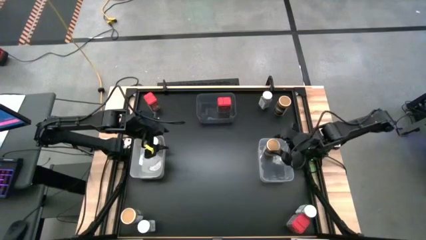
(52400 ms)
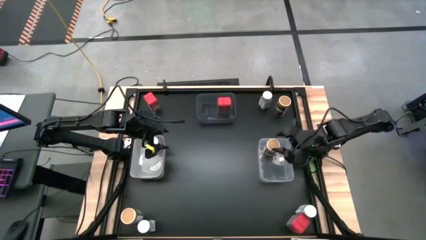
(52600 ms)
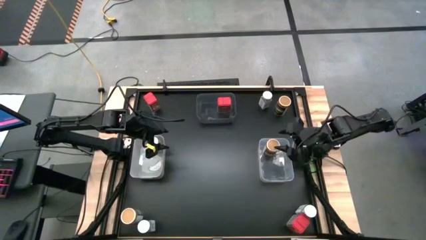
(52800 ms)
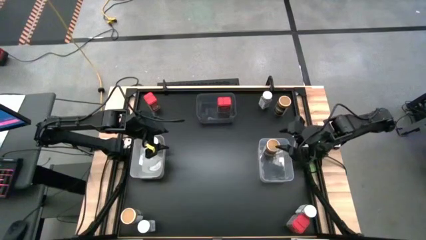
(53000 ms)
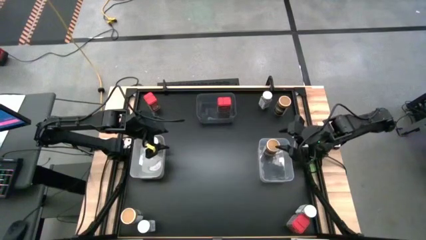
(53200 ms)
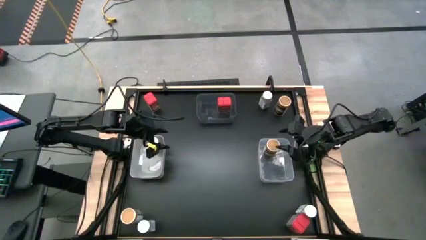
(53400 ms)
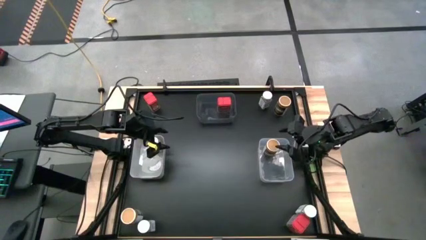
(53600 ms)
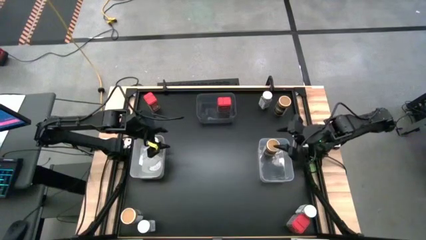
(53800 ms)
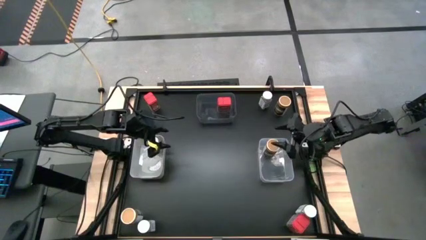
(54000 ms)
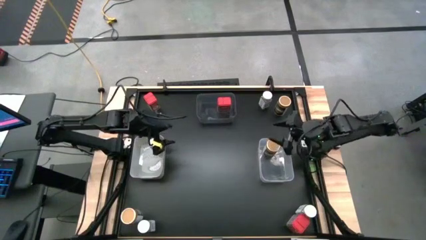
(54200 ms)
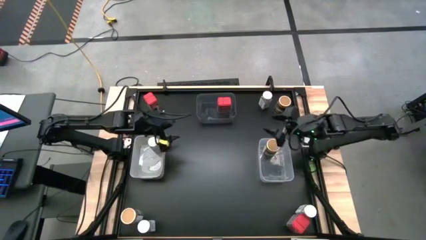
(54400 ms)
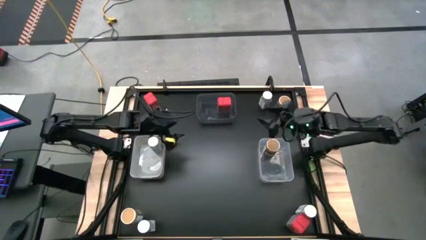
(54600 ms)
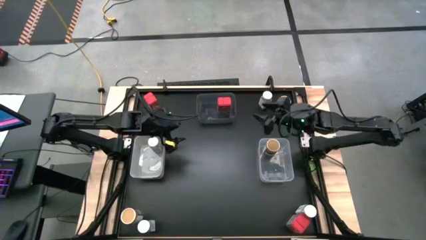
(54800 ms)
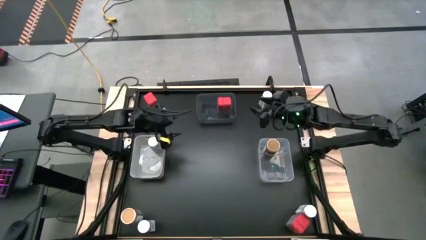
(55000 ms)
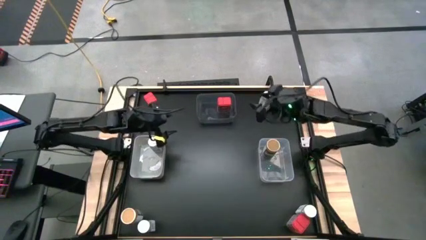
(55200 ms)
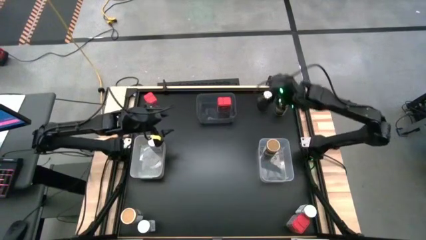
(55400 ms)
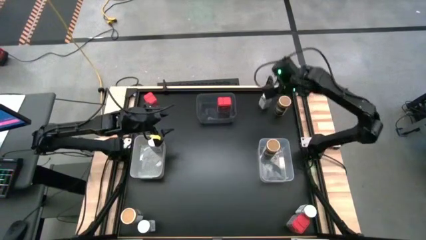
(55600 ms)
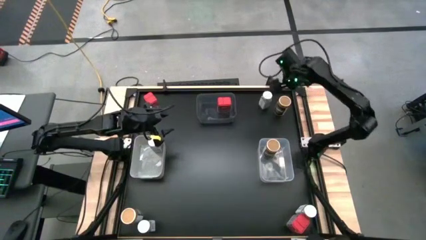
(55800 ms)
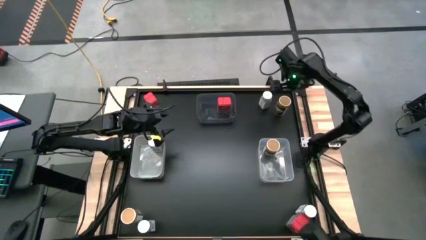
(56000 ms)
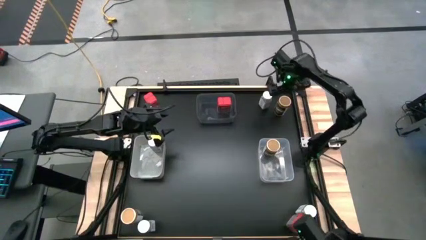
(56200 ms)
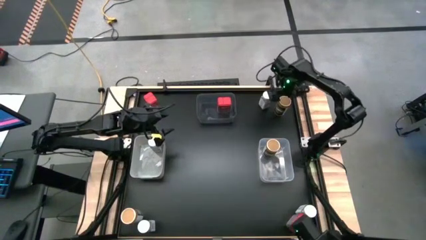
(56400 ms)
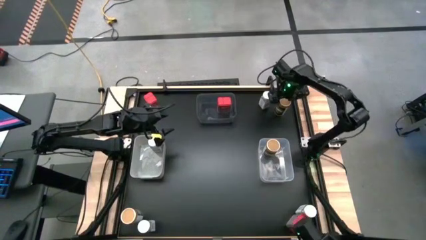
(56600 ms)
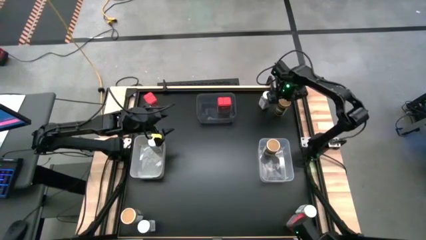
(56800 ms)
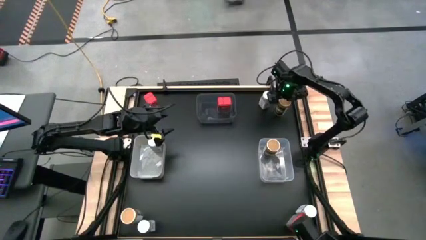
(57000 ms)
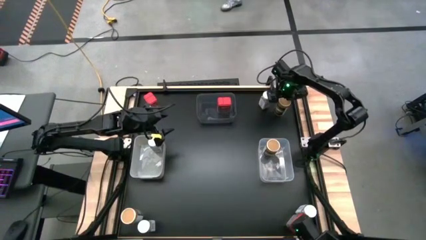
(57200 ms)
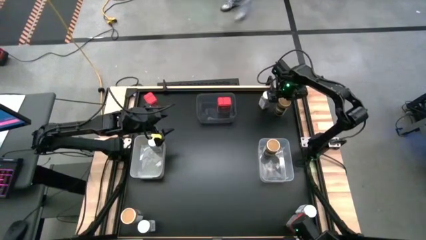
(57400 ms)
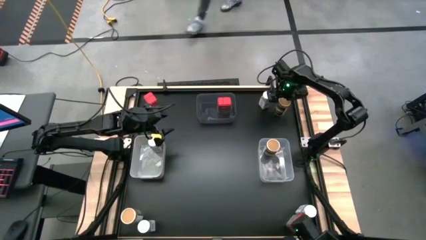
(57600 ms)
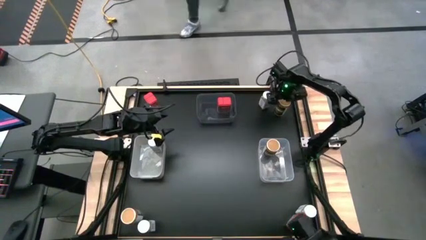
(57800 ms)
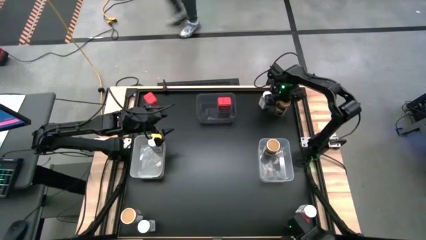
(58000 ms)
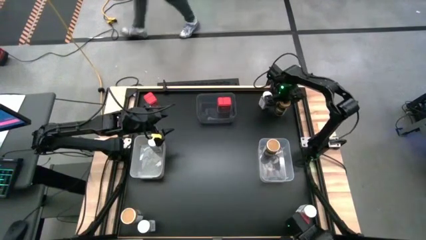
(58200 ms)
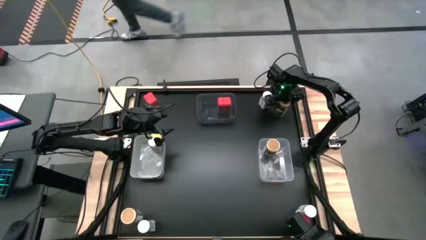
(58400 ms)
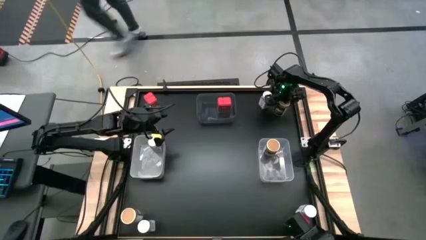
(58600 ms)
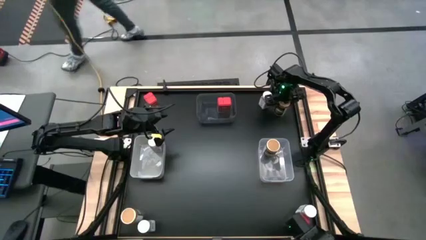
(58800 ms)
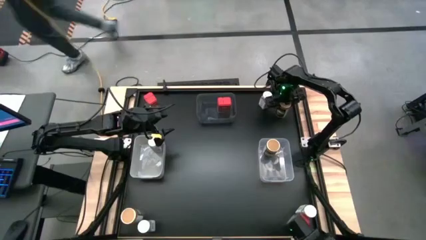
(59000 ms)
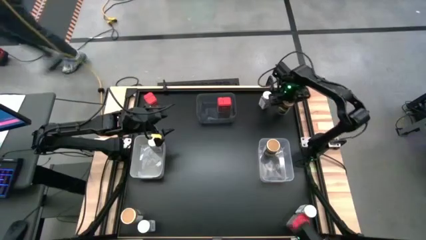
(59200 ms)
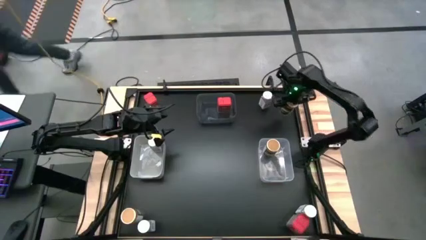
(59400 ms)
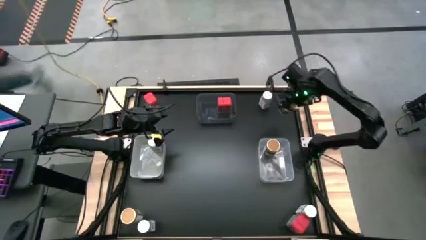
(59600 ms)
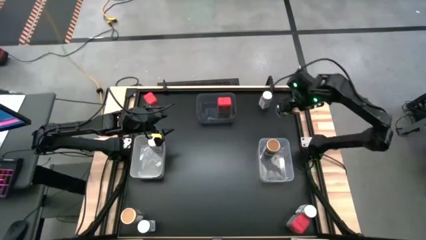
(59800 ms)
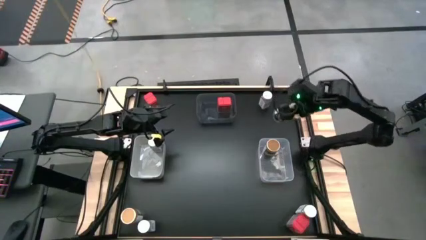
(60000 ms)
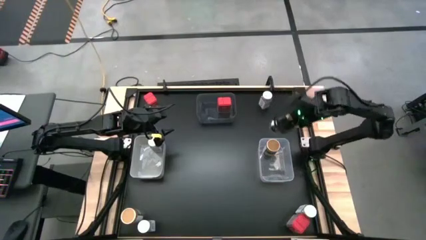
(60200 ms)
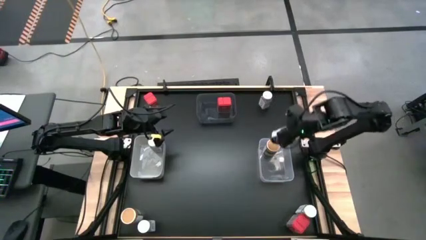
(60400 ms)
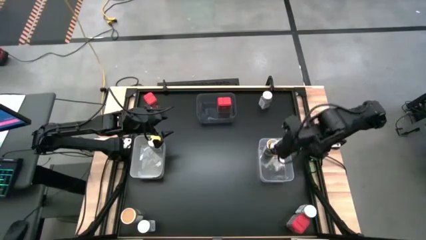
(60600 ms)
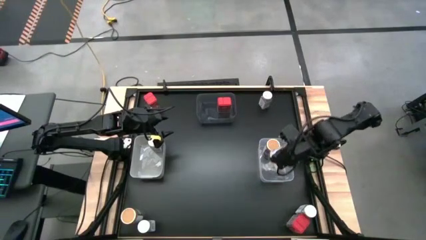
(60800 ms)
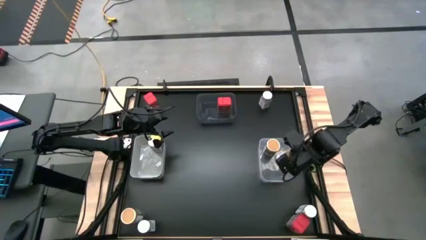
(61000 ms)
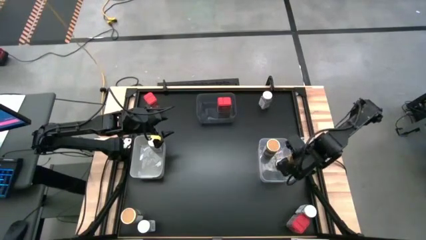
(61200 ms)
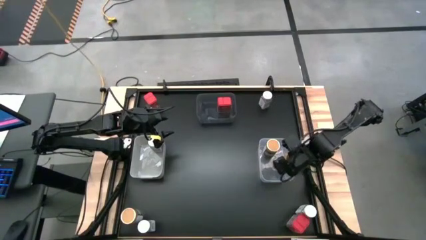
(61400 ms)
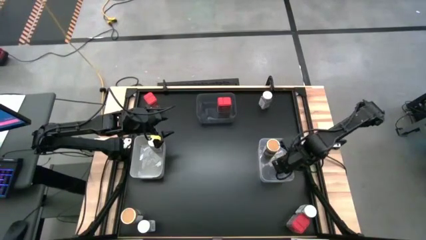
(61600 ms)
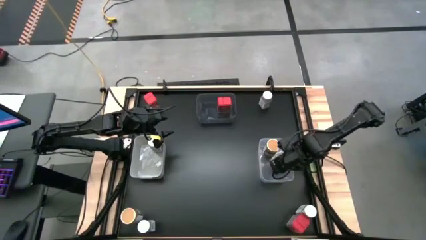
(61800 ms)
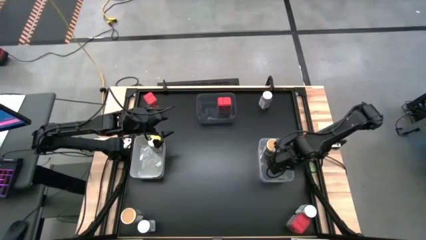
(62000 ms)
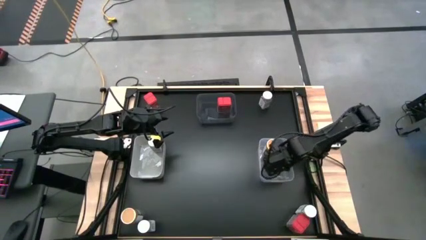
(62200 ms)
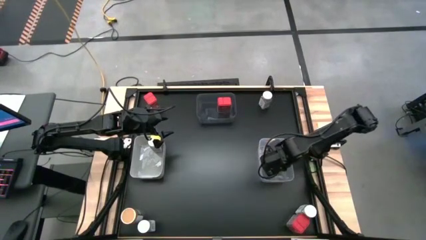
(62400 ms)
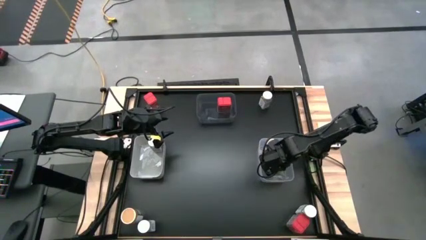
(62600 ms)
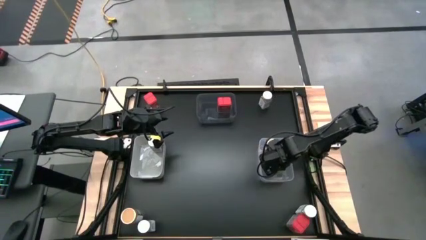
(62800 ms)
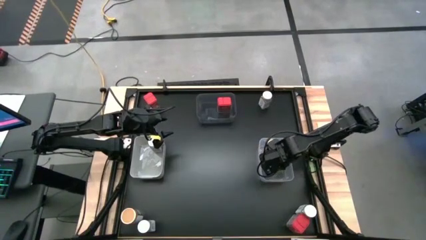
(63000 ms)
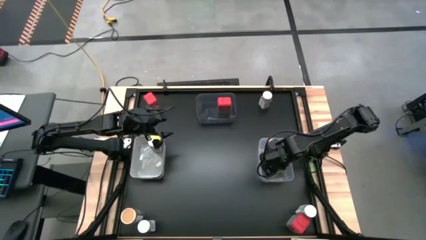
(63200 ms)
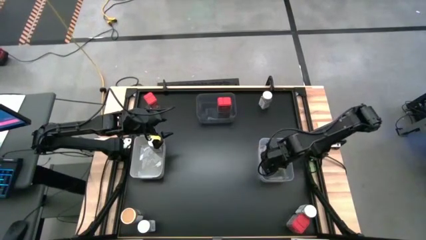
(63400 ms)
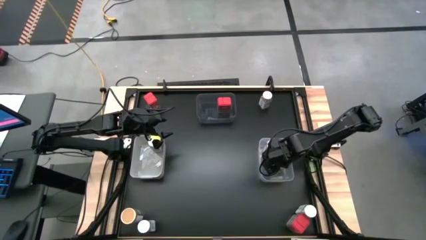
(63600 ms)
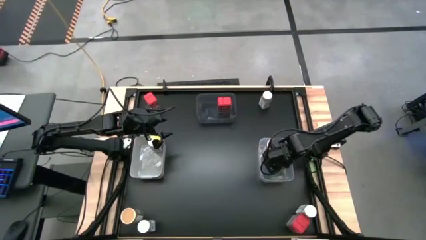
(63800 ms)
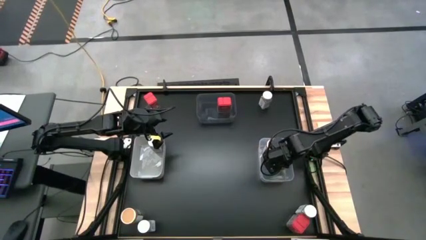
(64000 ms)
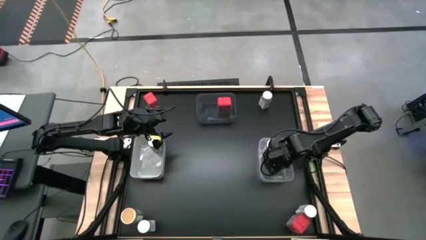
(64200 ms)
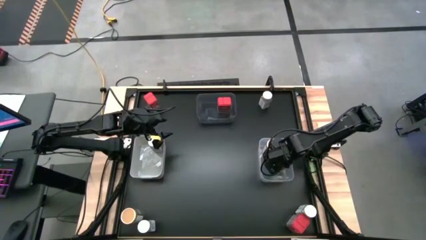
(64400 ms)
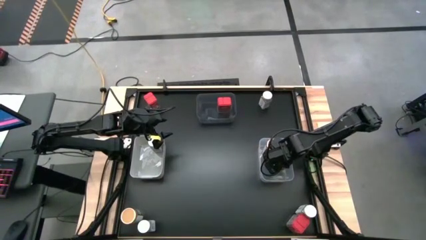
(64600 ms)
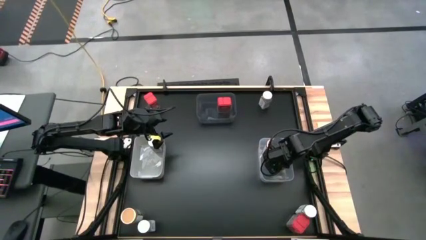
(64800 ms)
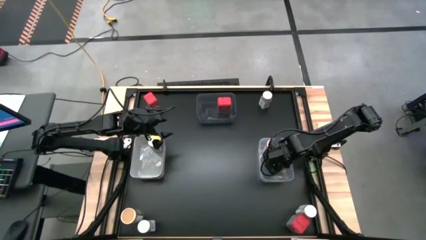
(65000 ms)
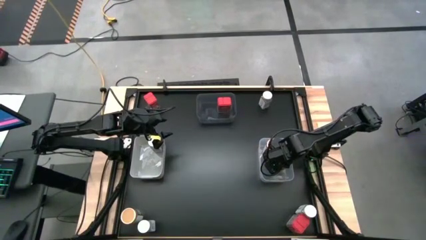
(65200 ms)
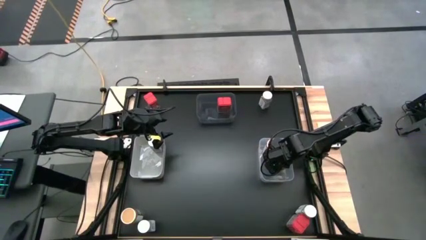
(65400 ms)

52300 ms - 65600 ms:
Task: Sort spices by type
Put the top gold seasoning bottle into the transparent bin
